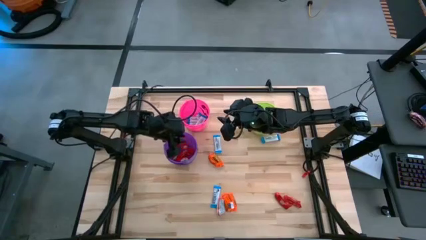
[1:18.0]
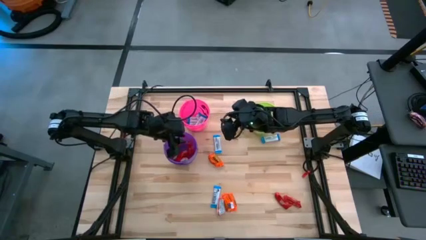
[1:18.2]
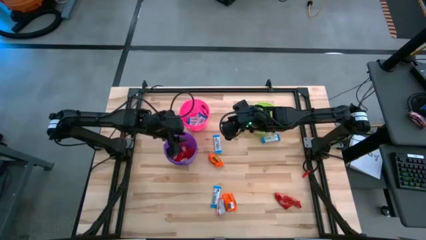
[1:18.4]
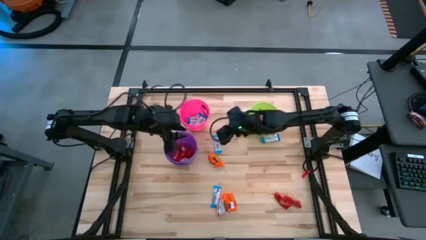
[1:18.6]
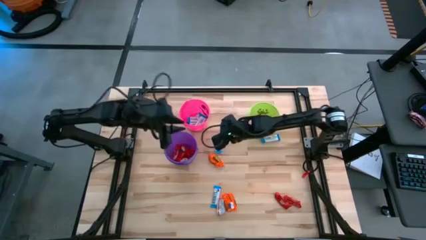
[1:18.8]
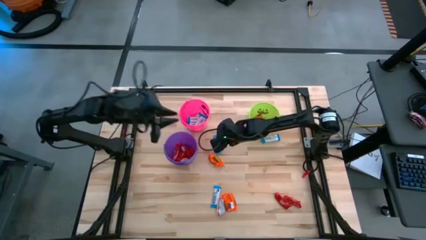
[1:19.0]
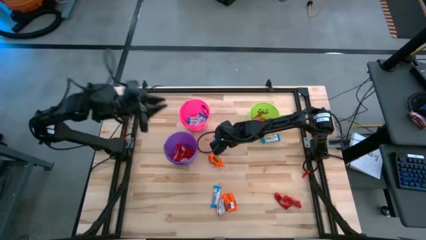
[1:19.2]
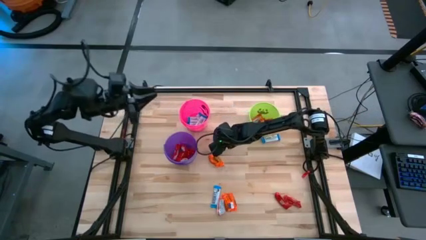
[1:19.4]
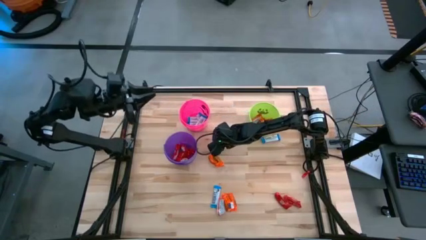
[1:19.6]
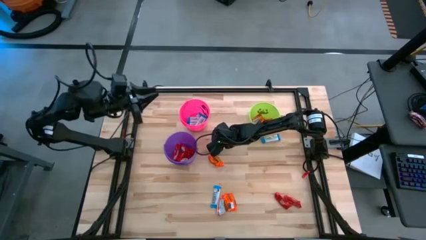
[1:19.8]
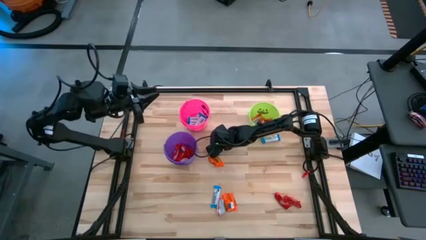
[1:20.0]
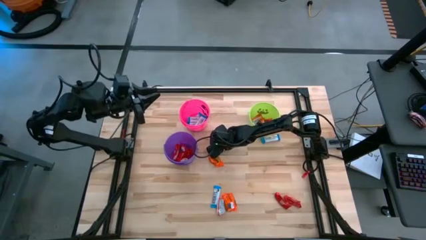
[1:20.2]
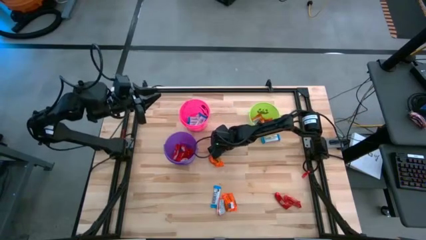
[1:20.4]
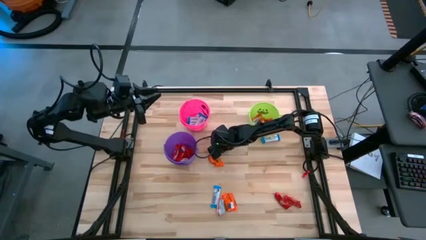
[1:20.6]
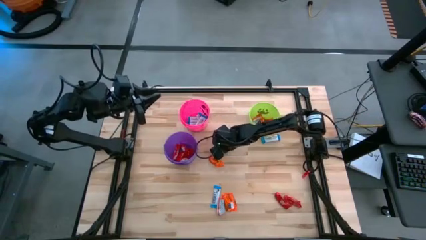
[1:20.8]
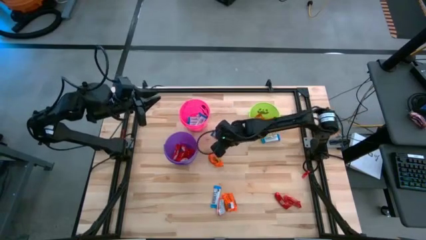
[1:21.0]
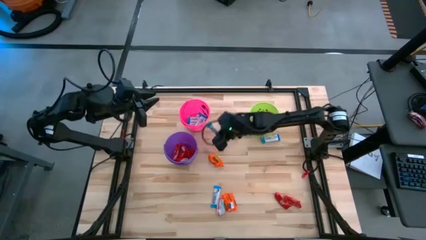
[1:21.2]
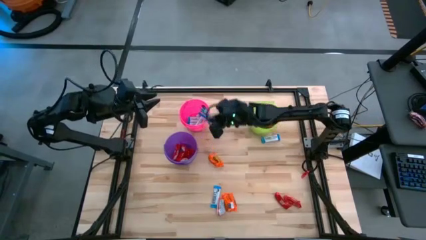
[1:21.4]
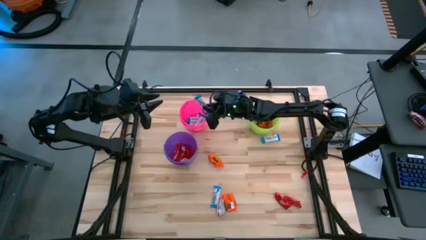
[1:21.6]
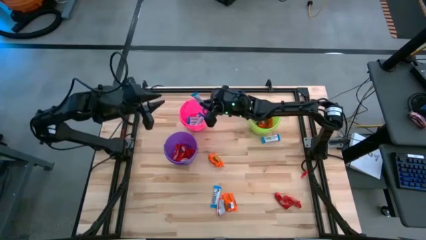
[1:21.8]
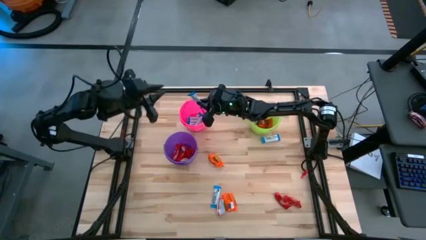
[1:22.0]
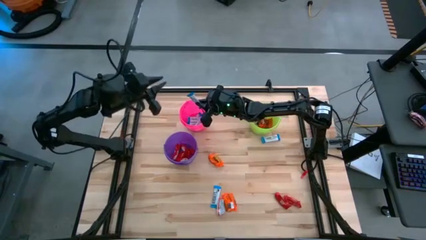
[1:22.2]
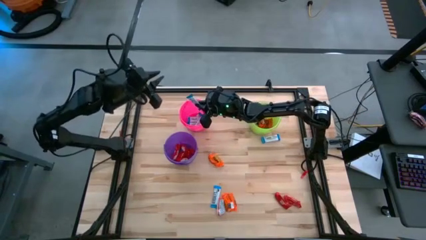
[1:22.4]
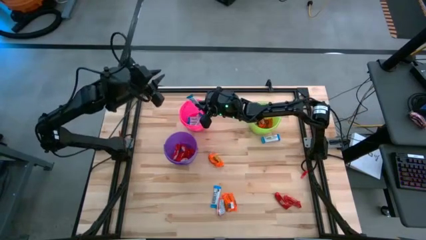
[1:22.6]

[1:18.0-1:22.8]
Task: Sort candy
Put the white chocolate into the pink bucket

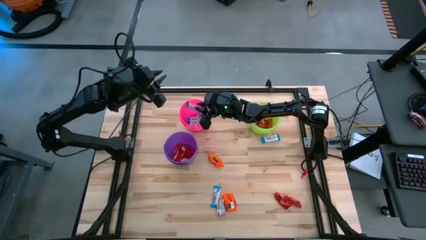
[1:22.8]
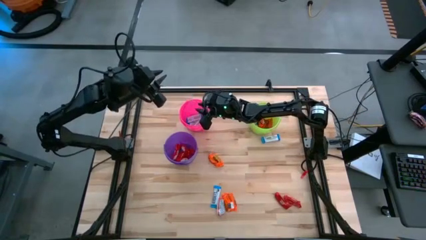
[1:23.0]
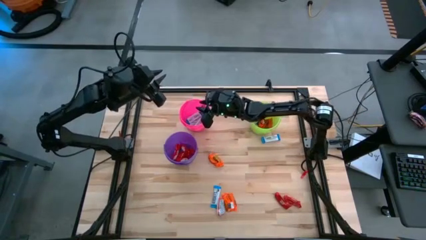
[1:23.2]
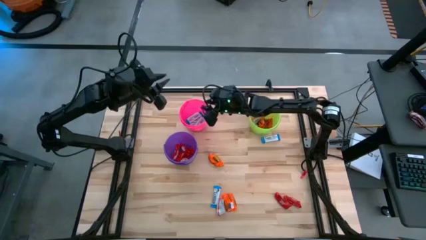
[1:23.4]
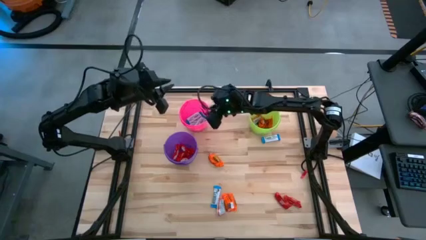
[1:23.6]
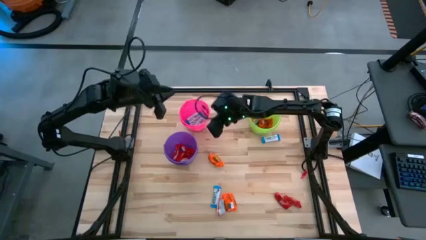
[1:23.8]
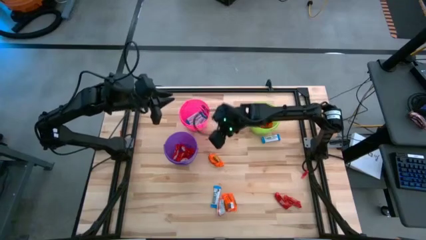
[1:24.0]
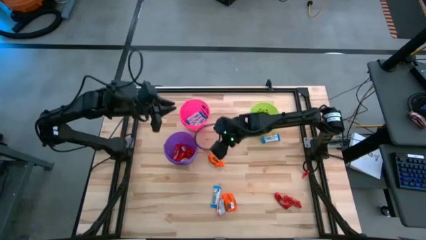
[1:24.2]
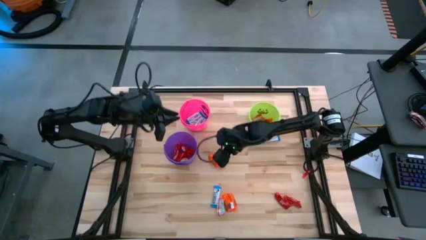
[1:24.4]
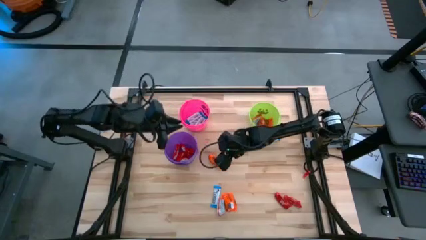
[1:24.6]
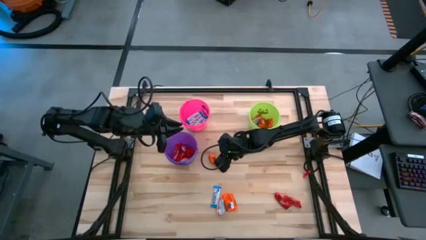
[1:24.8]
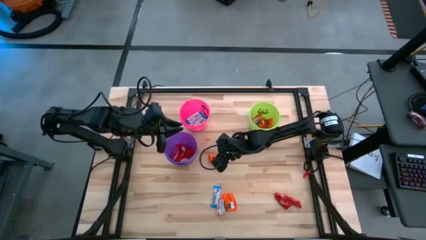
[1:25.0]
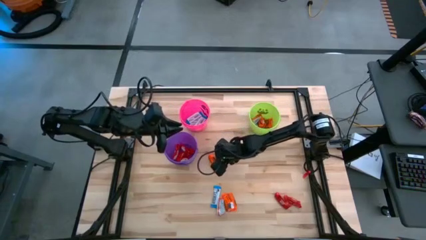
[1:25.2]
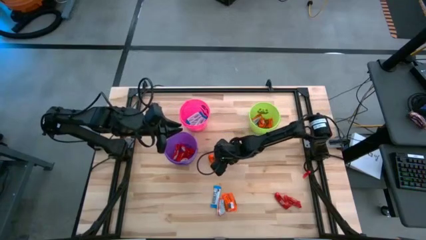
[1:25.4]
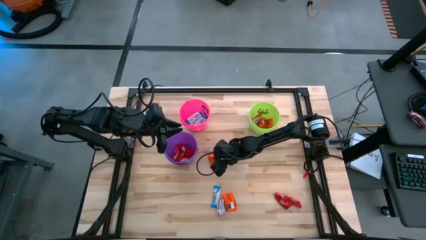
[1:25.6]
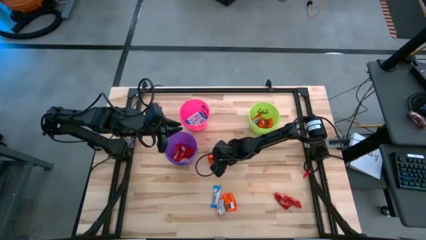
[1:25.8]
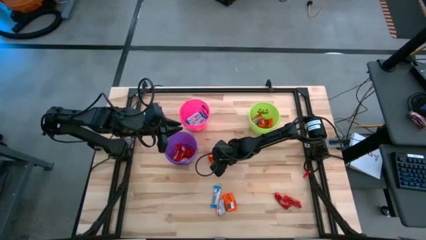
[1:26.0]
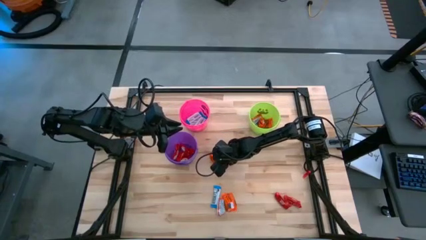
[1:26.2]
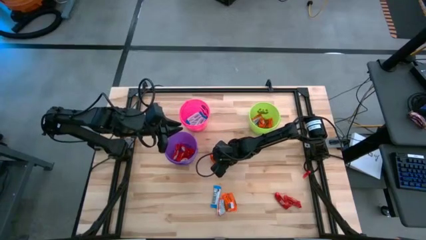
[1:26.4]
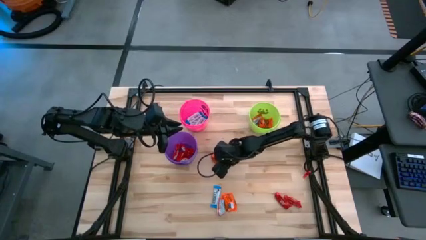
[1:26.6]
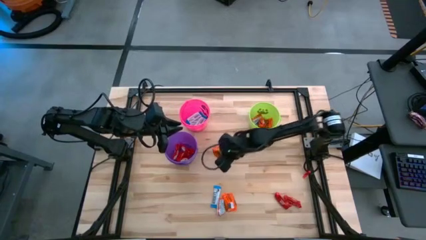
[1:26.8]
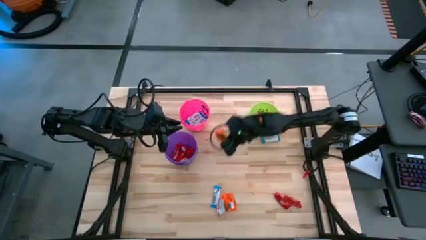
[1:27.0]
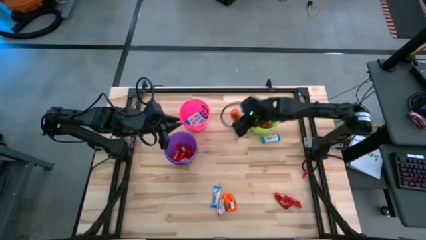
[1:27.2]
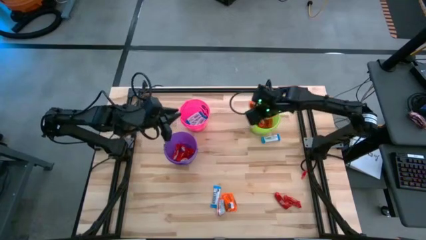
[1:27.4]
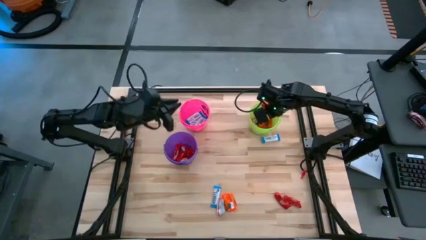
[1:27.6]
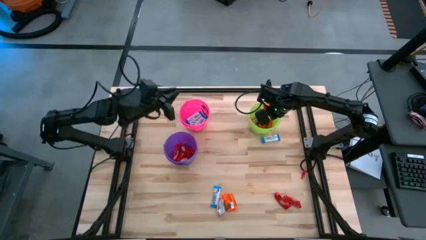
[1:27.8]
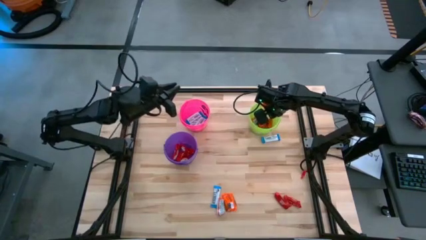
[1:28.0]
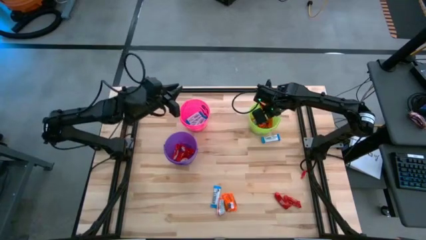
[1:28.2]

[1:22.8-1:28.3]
Put the orange chocolate into the green bucket

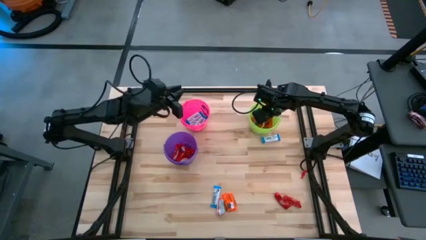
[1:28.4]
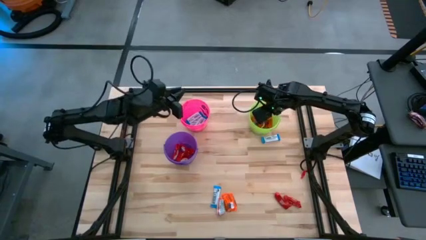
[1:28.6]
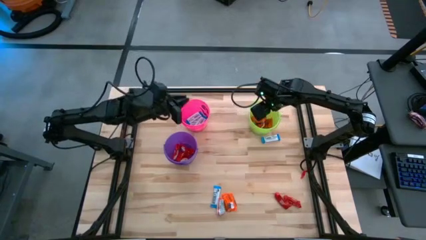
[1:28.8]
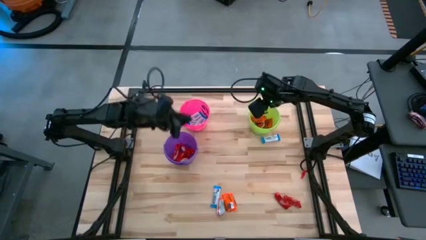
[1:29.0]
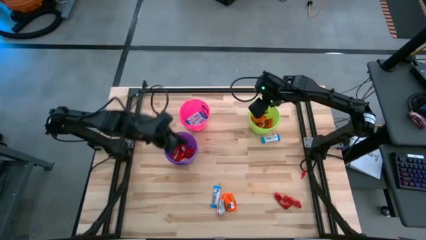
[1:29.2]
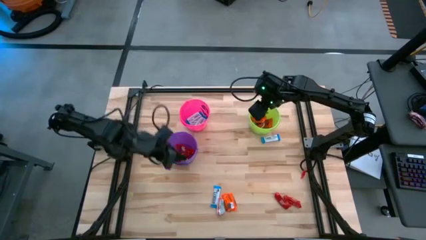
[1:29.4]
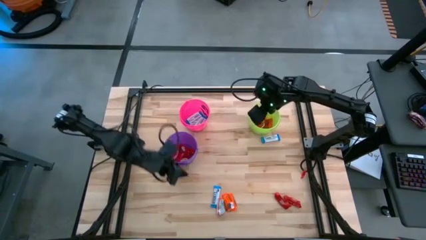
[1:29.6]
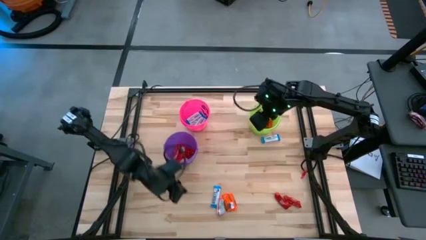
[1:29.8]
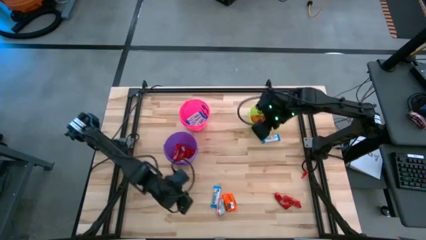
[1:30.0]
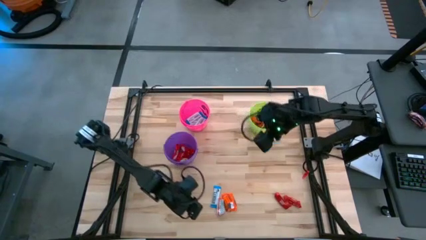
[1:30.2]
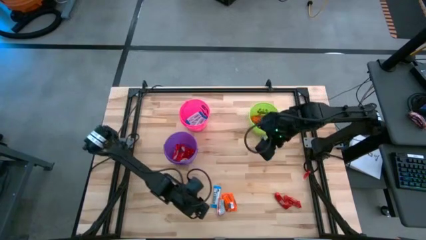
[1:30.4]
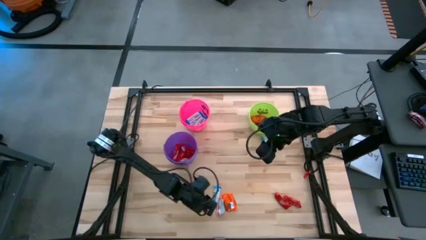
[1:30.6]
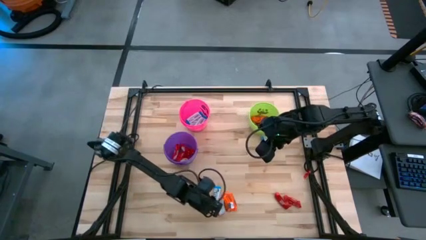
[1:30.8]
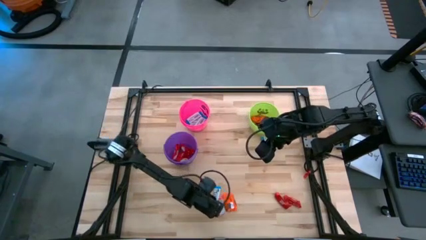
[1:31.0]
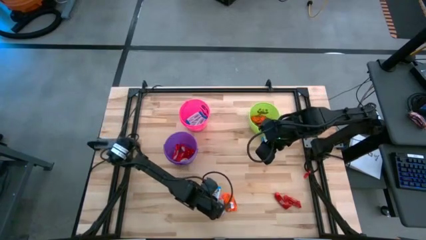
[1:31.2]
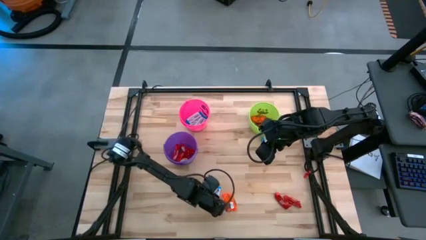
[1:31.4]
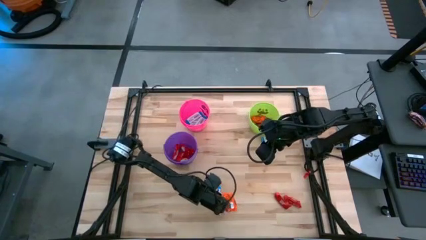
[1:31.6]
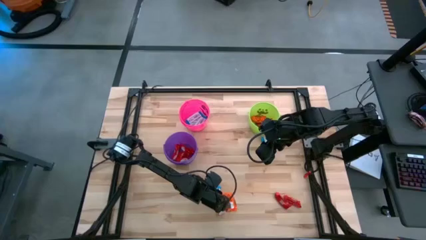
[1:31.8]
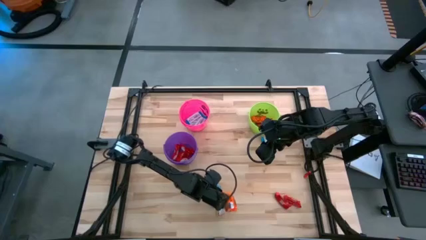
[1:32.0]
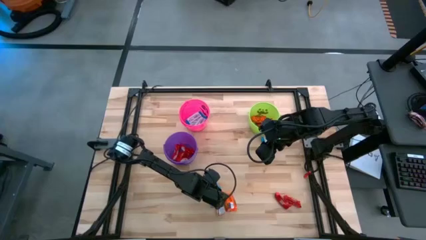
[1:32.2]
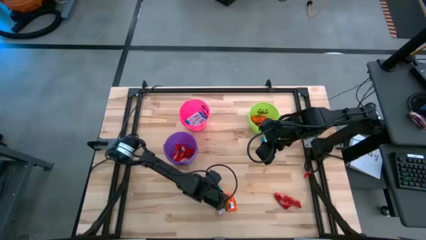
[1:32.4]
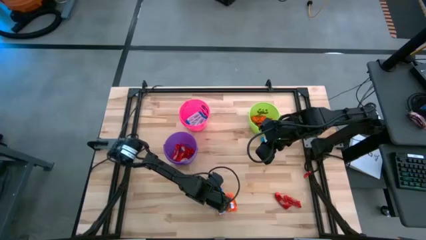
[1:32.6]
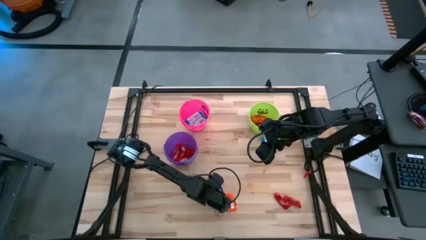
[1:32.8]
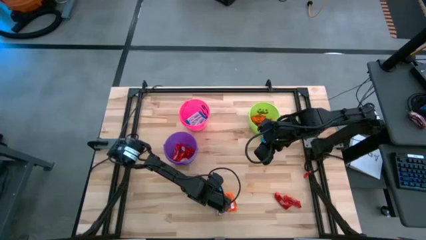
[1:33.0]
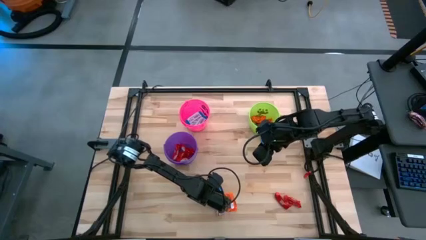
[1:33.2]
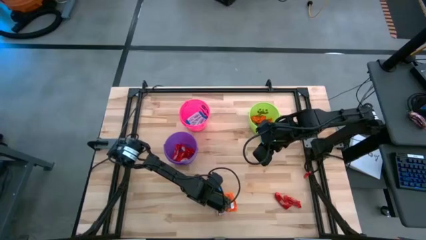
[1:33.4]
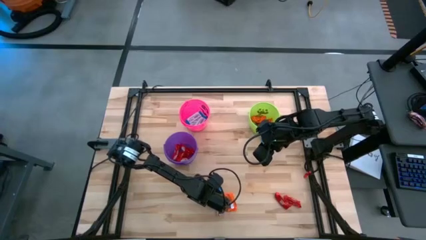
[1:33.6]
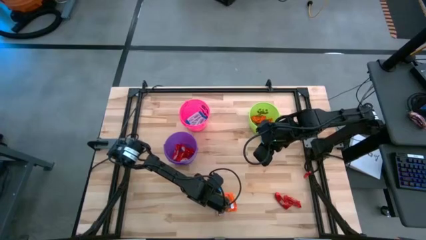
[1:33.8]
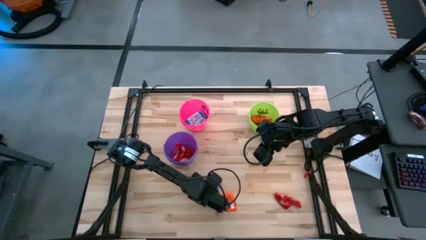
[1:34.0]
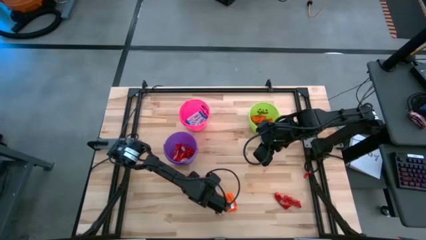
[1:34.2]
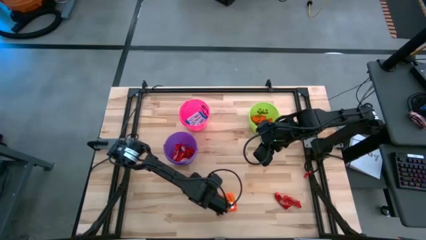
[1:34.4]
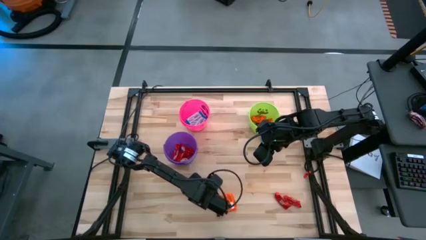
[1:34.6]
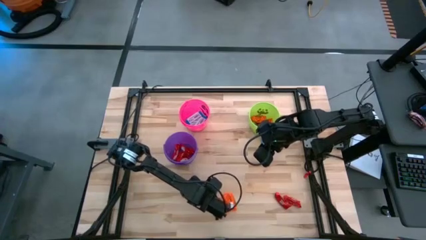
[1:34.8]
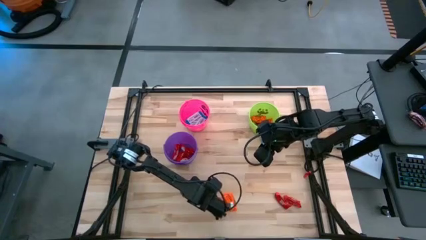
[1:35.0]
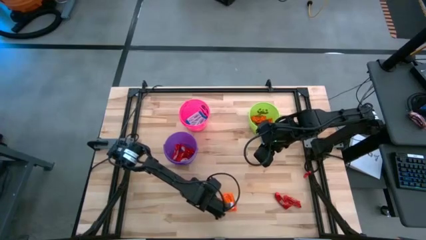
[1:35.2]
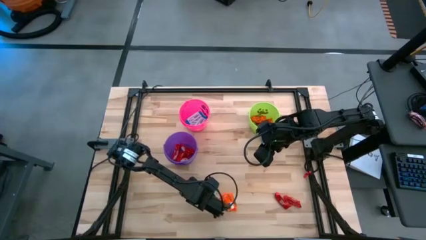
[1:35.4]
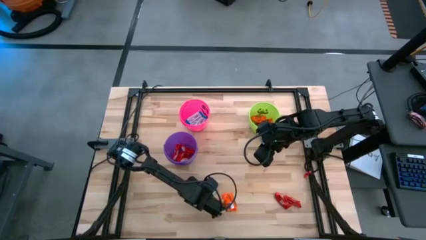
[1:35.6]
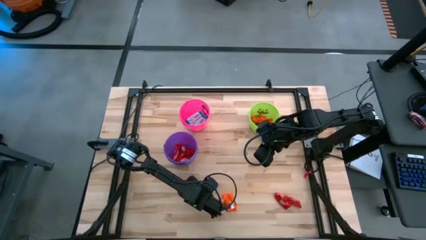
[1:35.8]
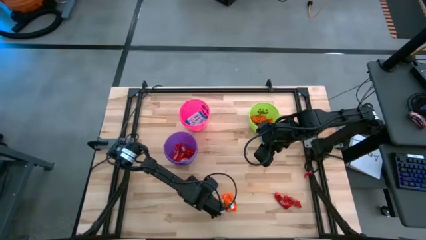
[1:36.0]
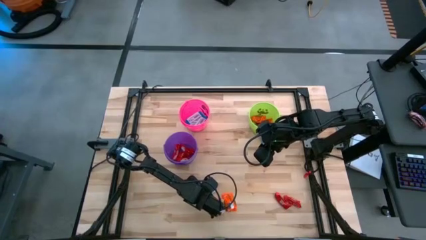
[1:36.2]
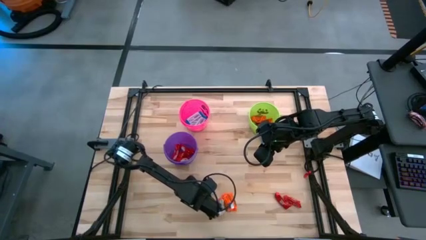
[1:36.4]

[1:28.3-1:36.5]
Put the white chocolate into the pink
